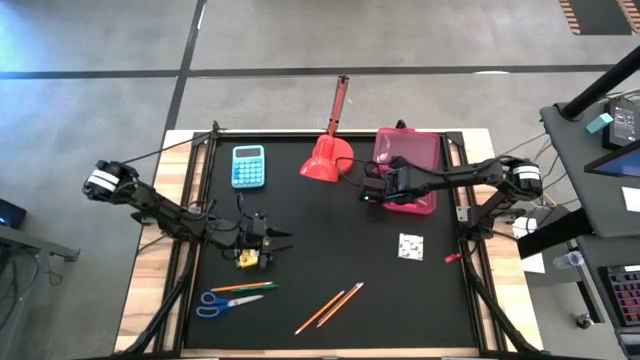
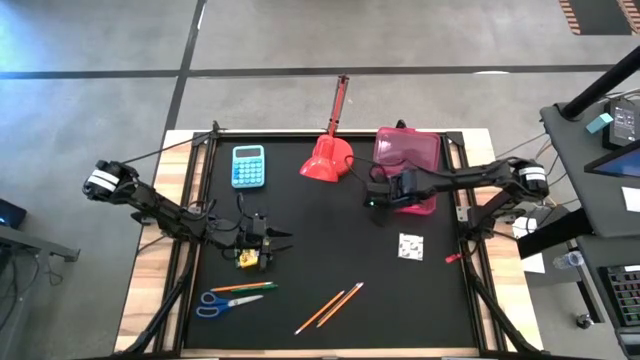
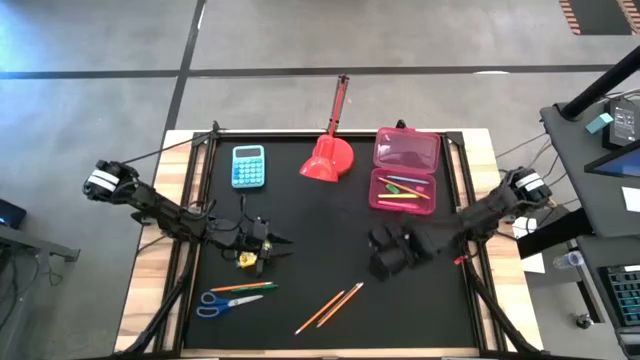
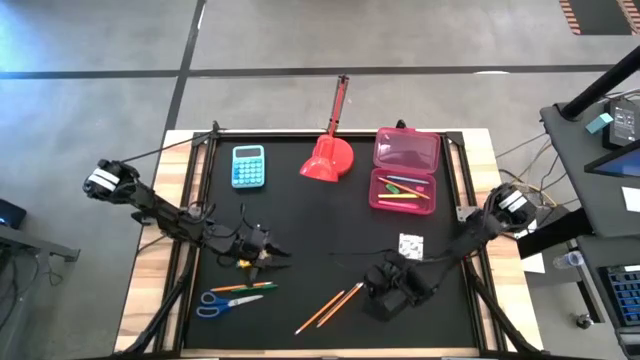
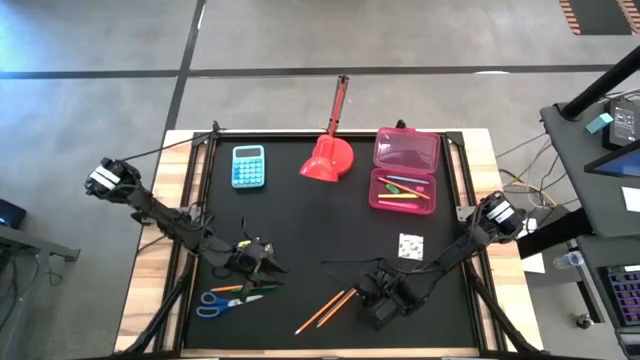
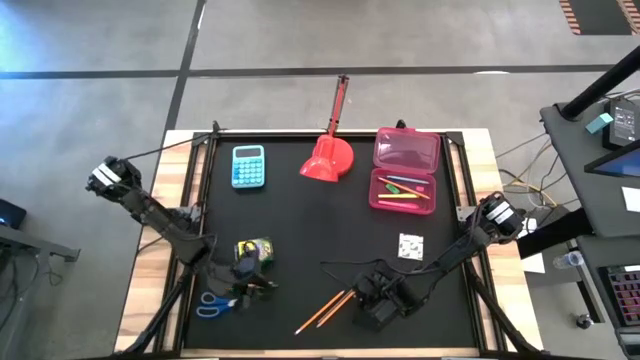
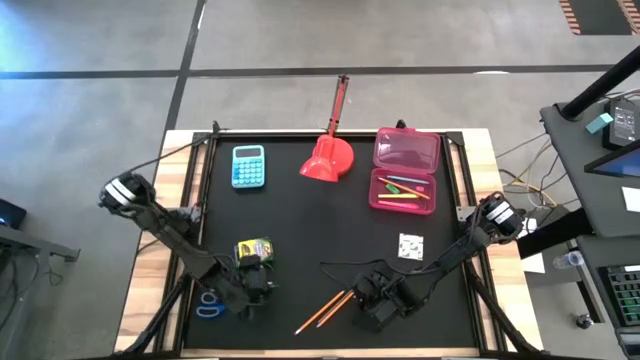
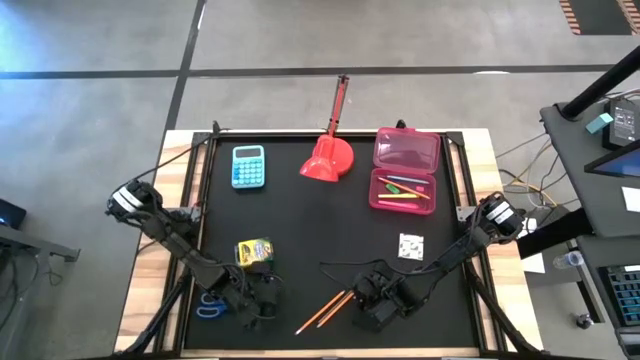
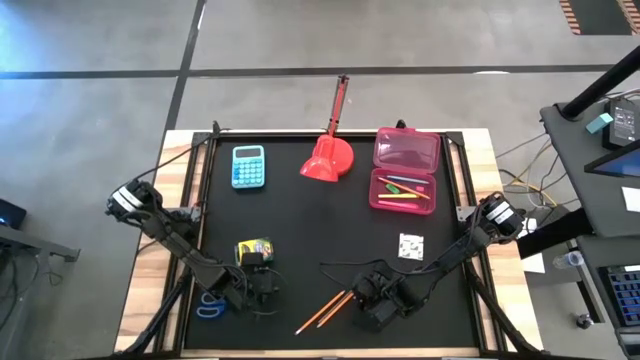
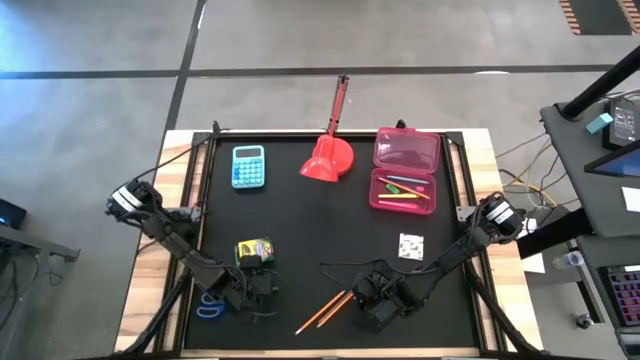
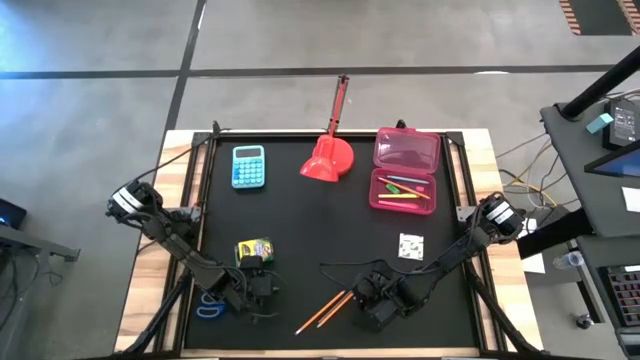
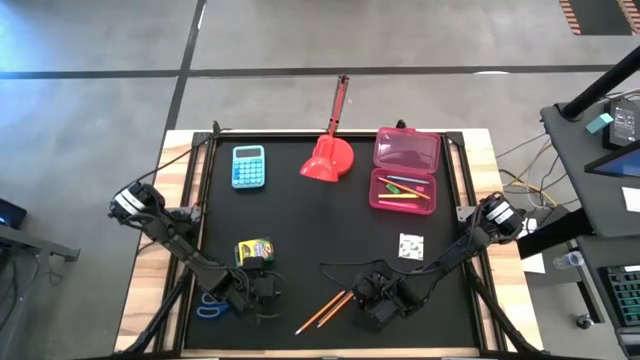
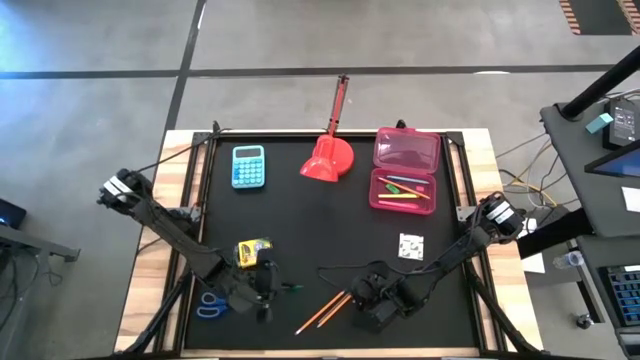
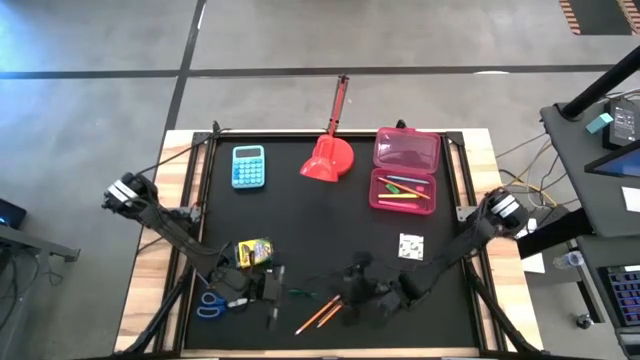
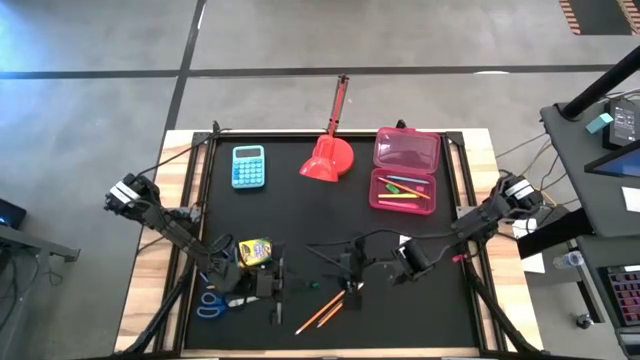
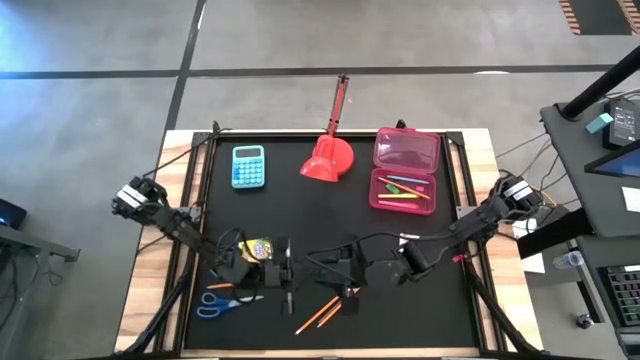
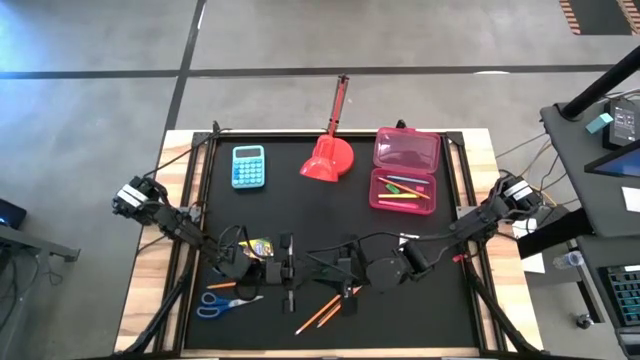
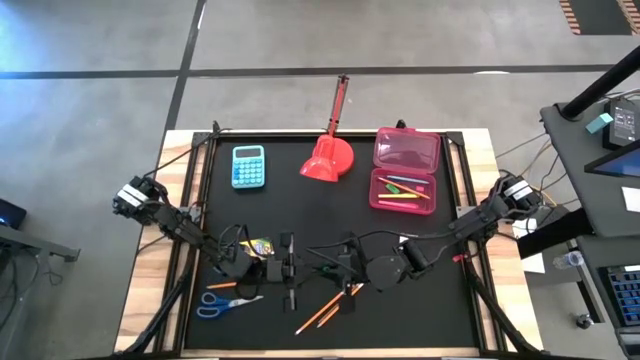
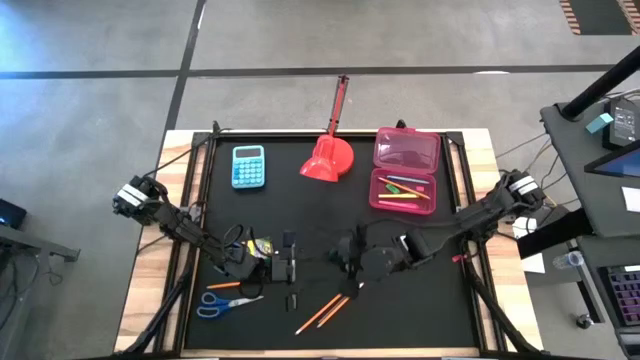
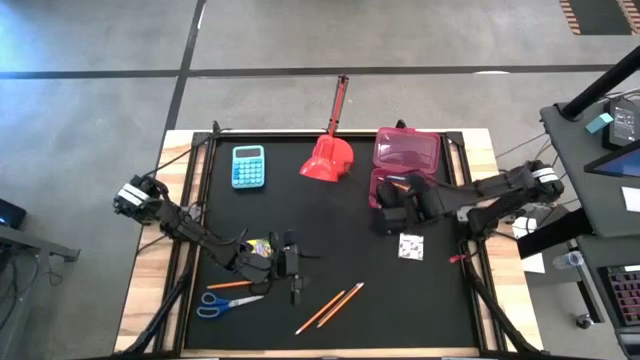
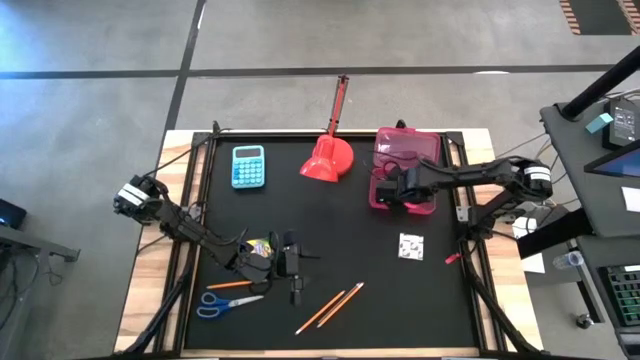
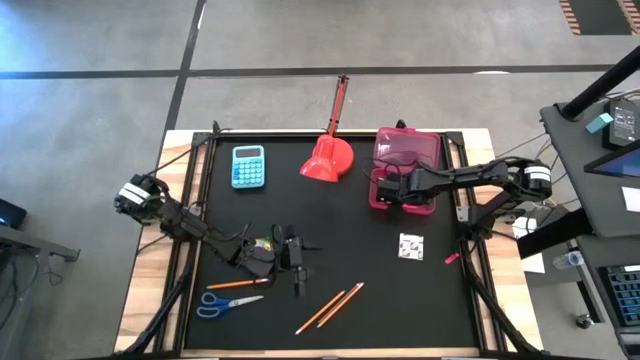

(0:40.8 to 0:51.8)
Task: Pack school essentials
Put the green pen into the pink supply box

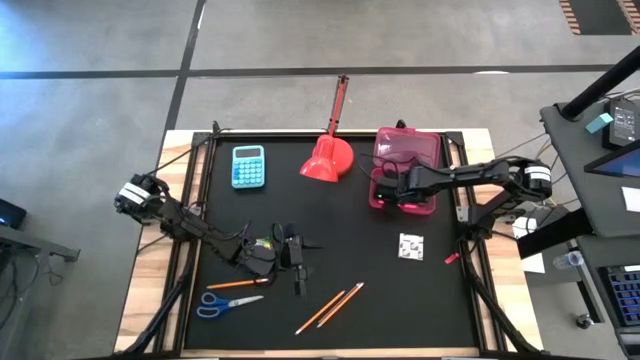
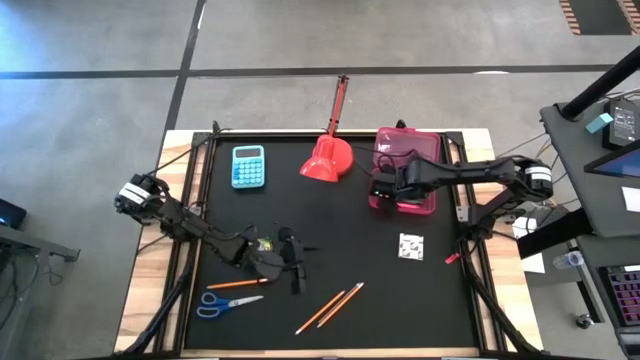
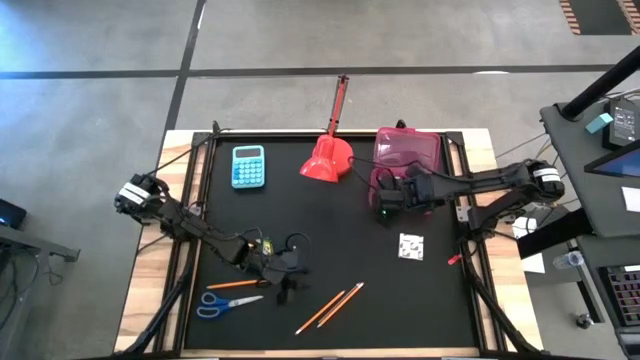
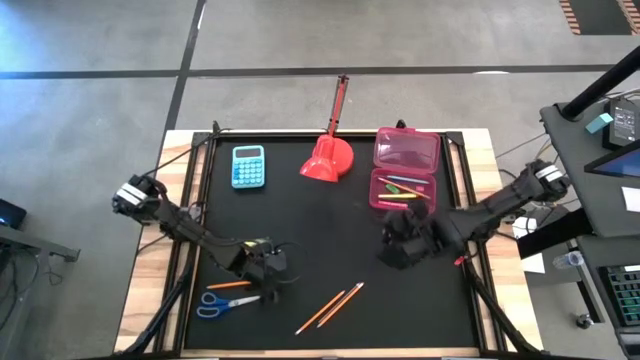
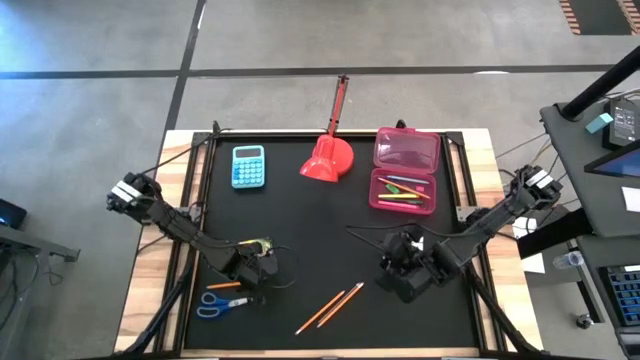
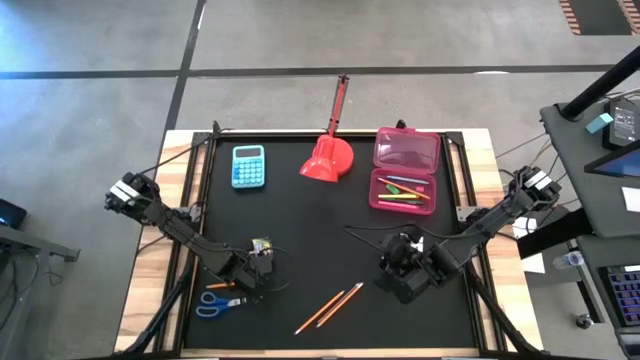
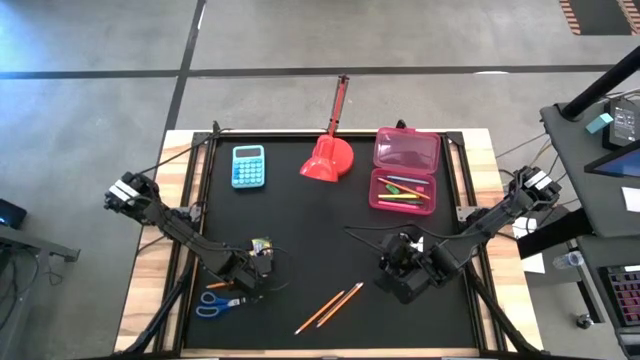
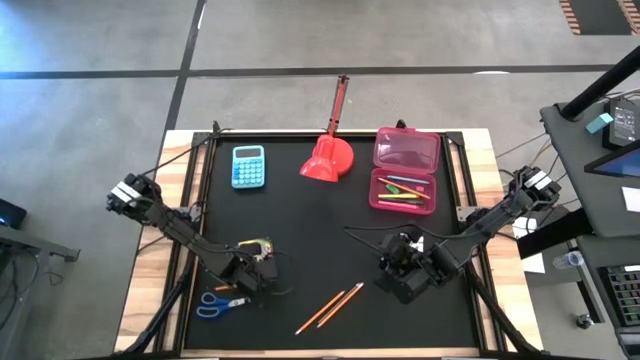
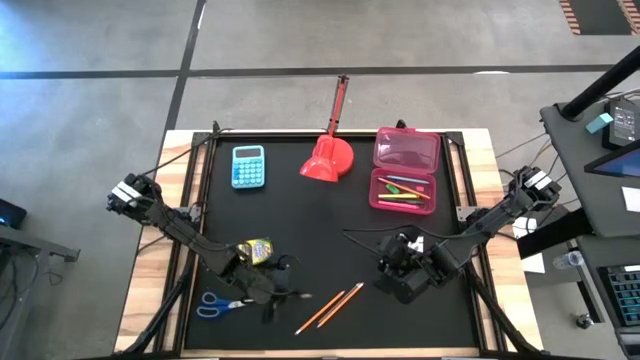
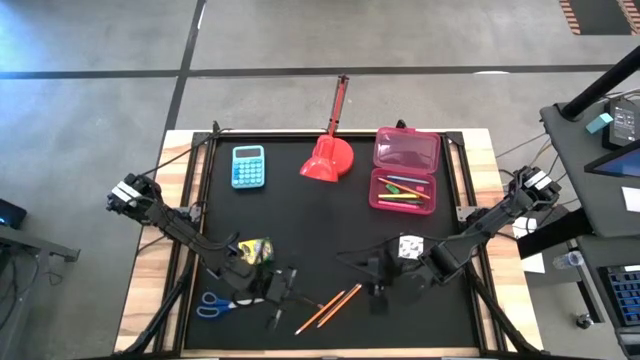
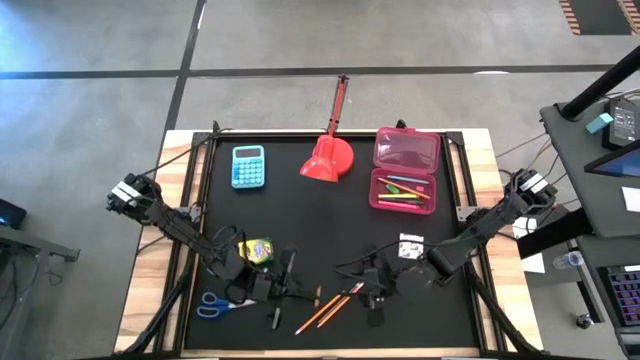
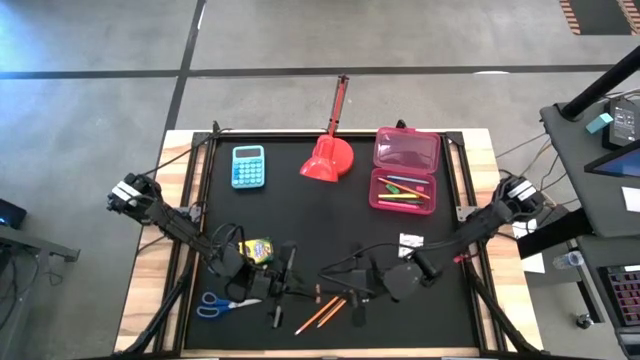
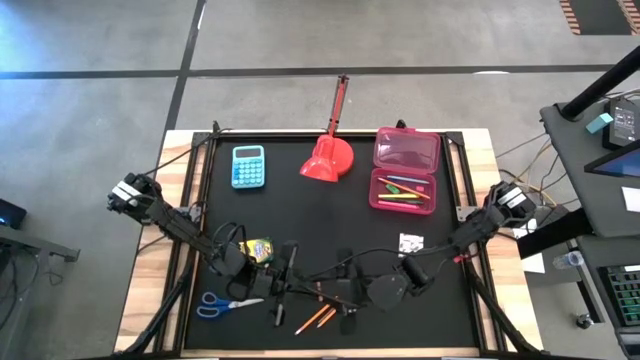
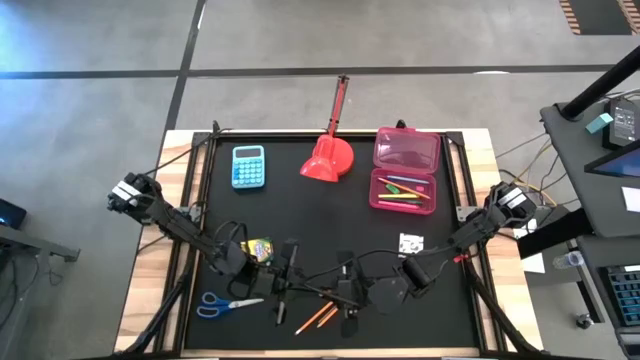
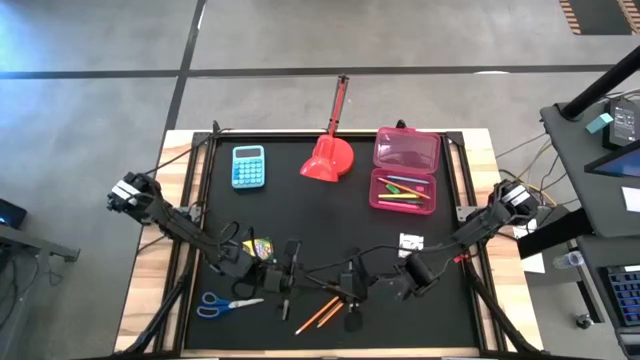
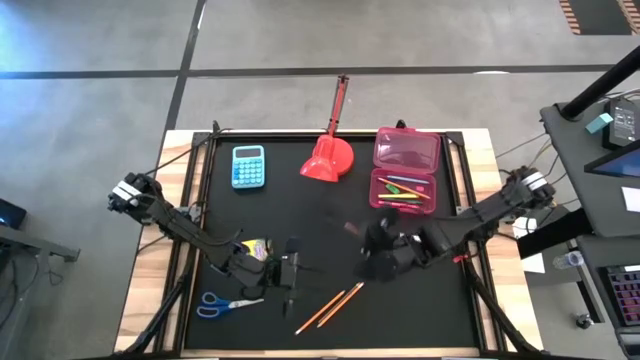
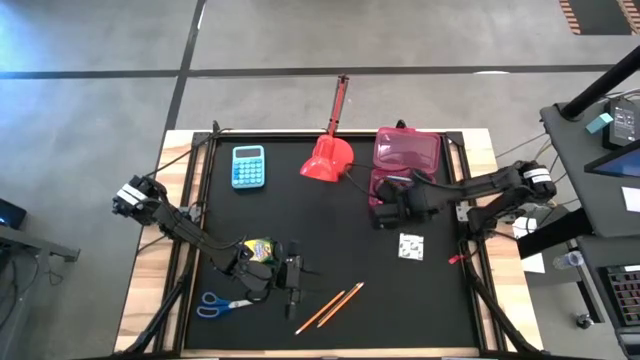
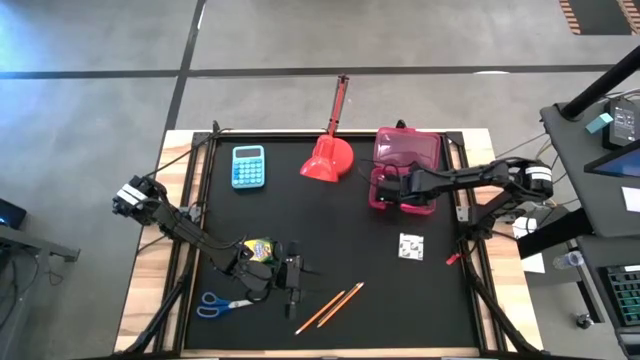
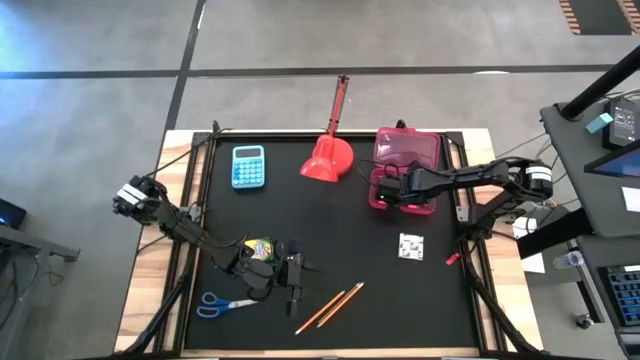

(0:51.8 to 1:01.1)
Put the orange pencil into the pink pencil supply box

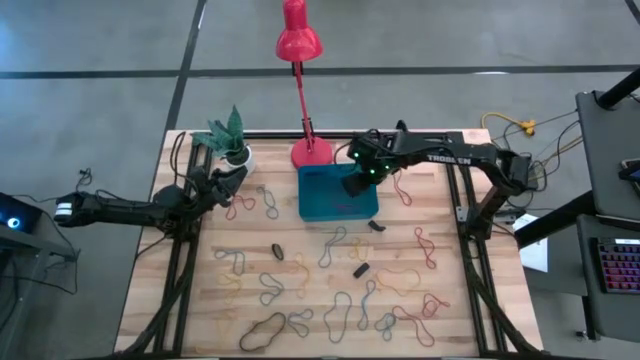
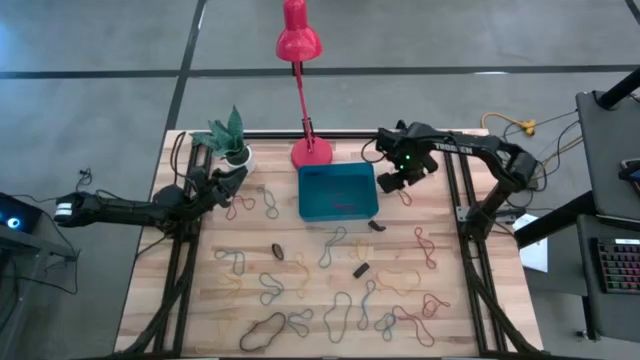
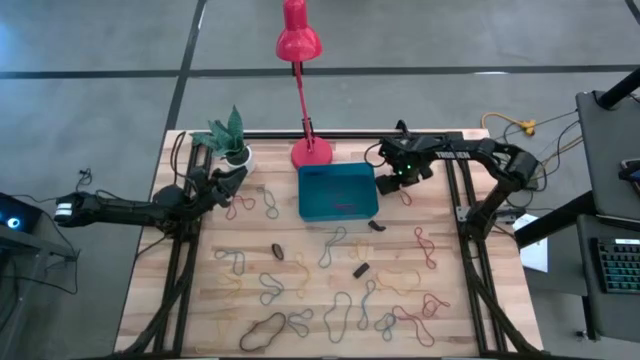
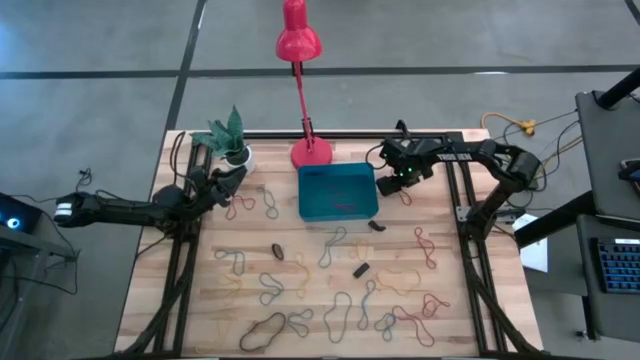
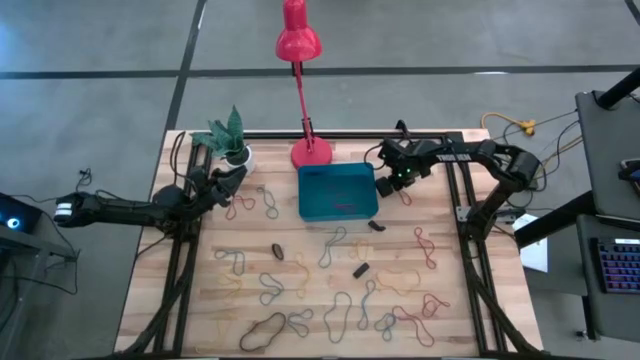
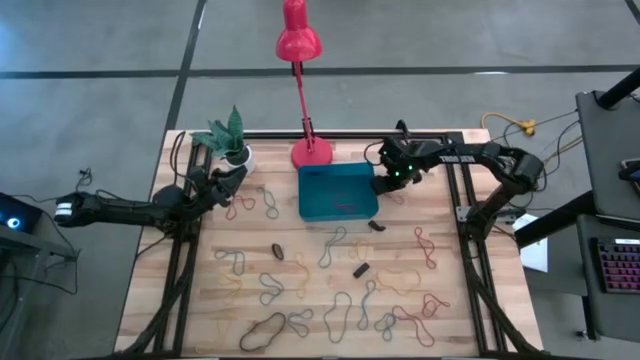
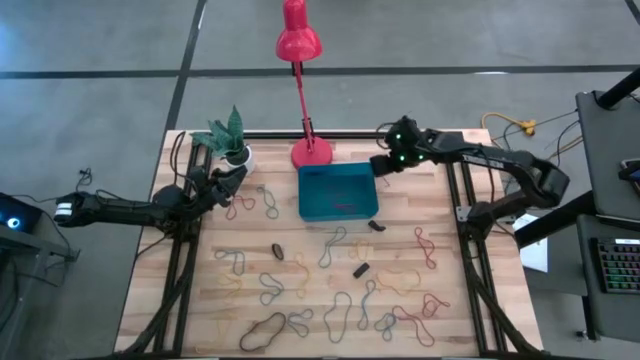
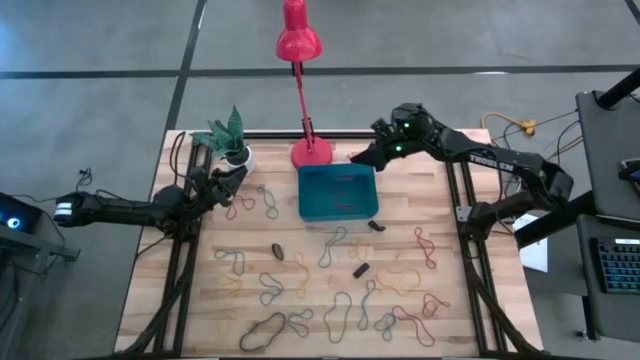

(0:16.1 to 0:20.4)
Task: Pick and place rubber bands into bin
Put the red rubber band into the blue bin
